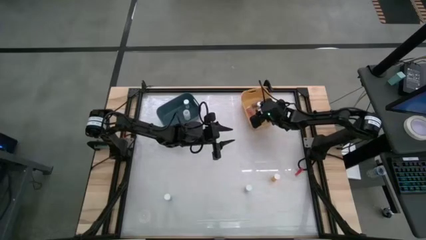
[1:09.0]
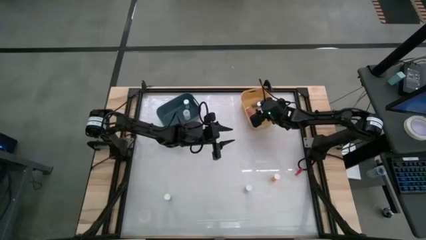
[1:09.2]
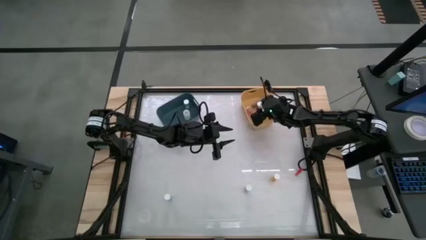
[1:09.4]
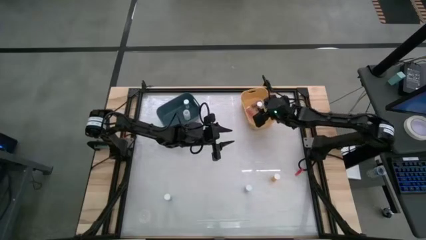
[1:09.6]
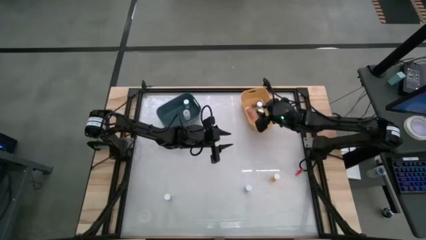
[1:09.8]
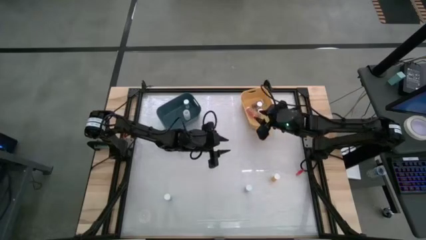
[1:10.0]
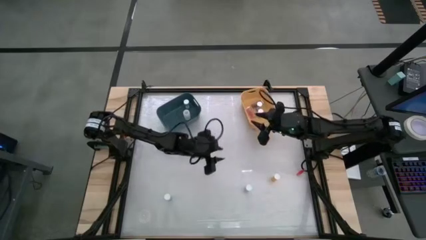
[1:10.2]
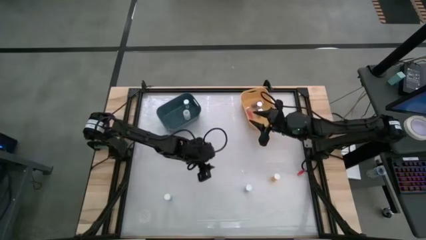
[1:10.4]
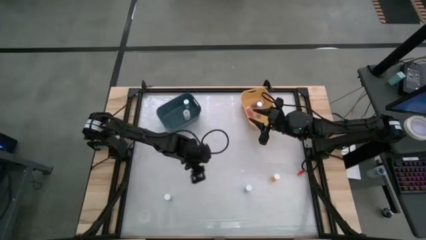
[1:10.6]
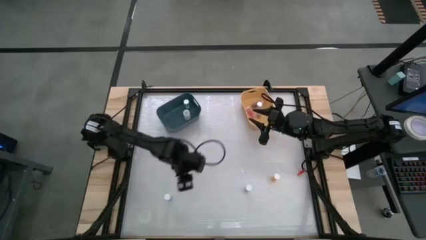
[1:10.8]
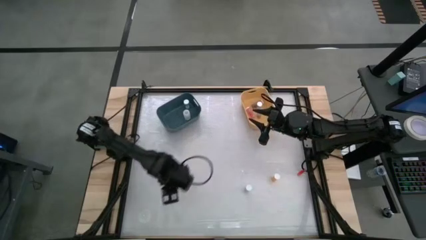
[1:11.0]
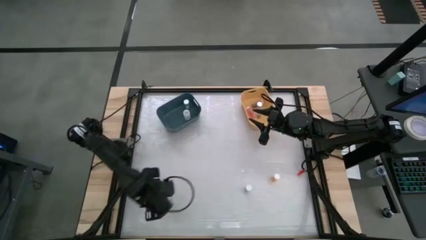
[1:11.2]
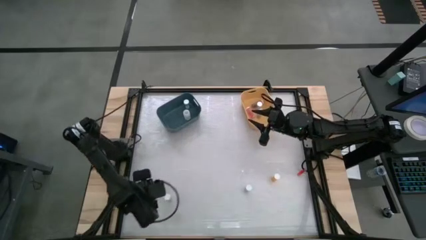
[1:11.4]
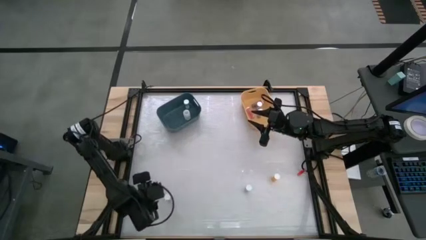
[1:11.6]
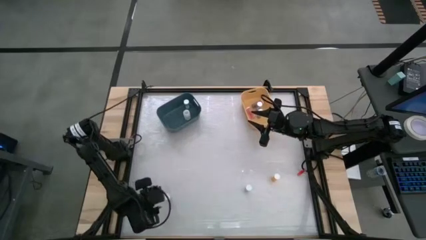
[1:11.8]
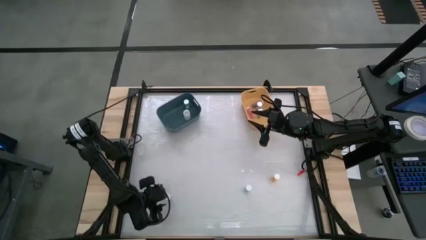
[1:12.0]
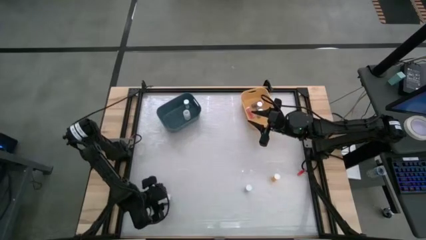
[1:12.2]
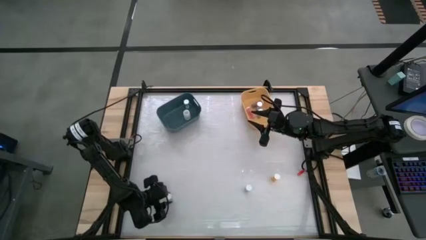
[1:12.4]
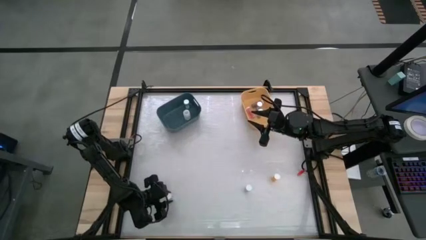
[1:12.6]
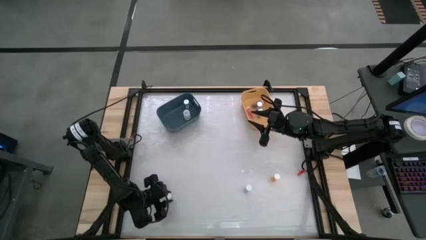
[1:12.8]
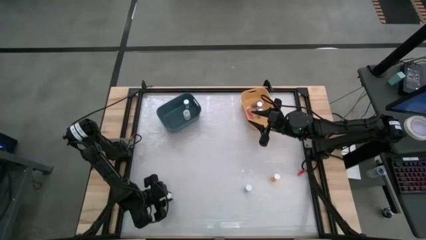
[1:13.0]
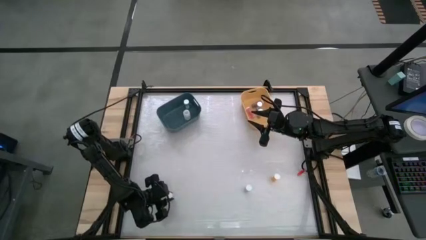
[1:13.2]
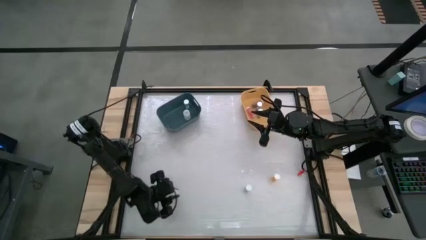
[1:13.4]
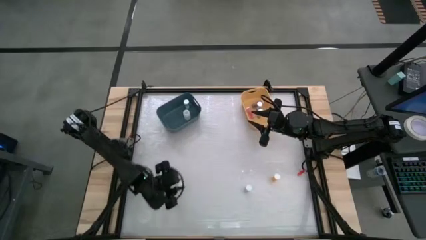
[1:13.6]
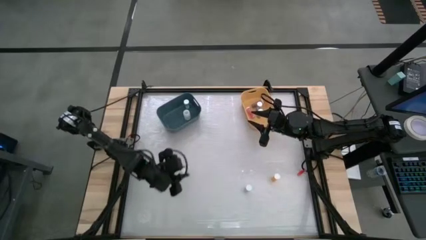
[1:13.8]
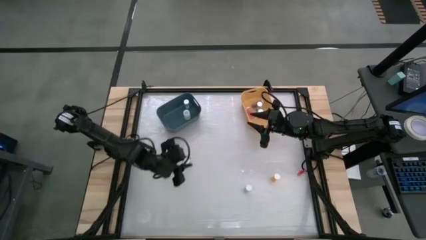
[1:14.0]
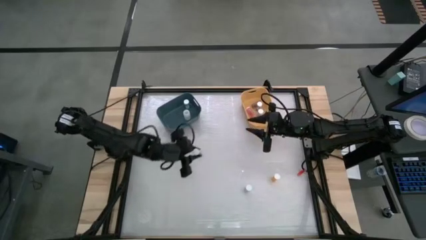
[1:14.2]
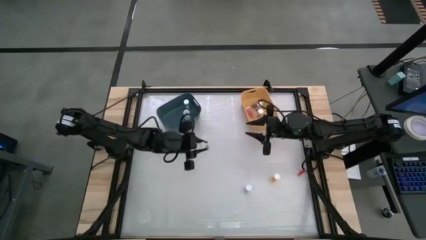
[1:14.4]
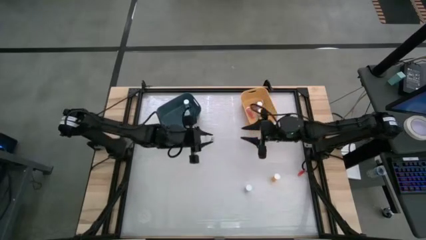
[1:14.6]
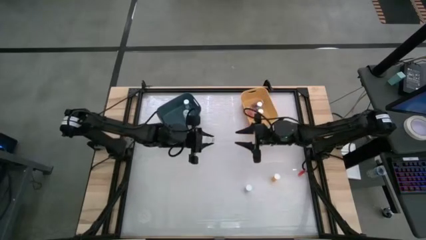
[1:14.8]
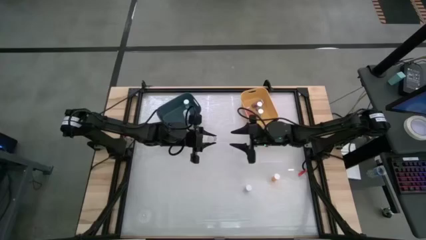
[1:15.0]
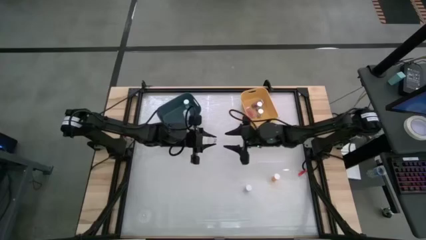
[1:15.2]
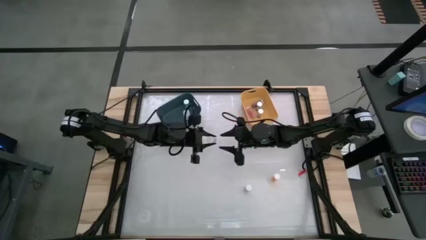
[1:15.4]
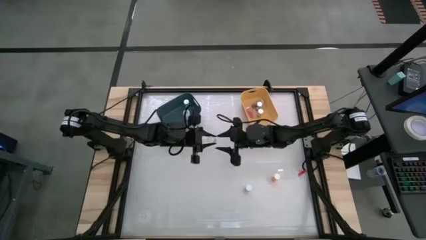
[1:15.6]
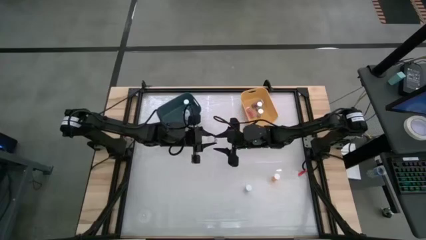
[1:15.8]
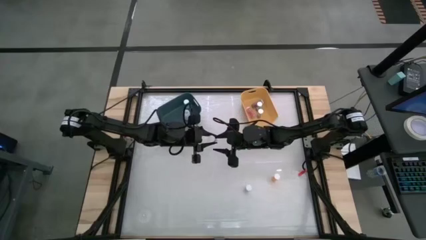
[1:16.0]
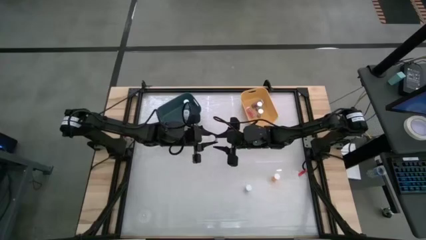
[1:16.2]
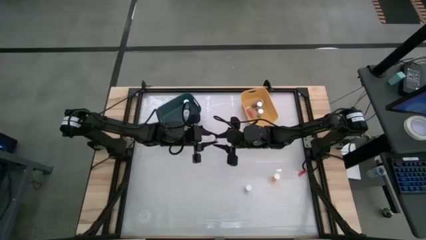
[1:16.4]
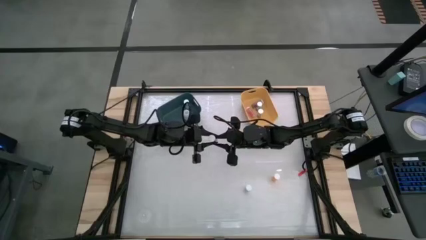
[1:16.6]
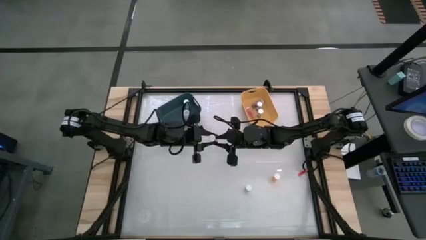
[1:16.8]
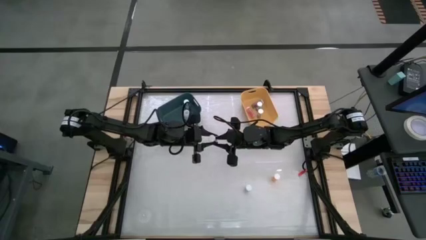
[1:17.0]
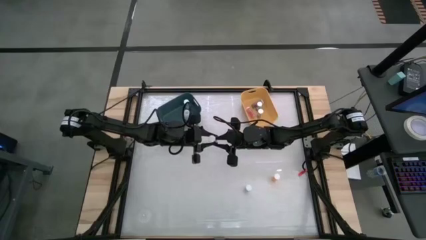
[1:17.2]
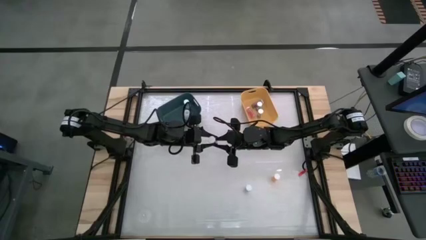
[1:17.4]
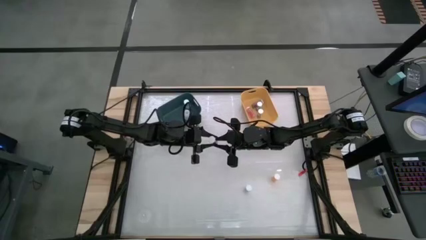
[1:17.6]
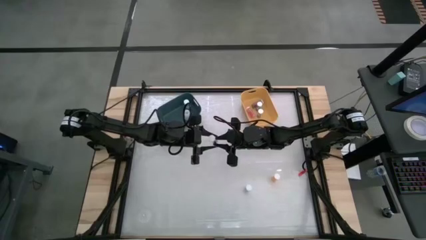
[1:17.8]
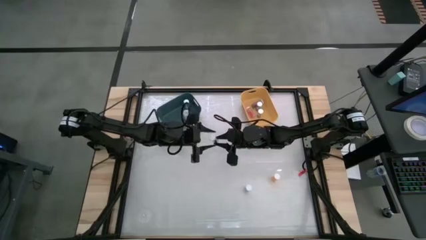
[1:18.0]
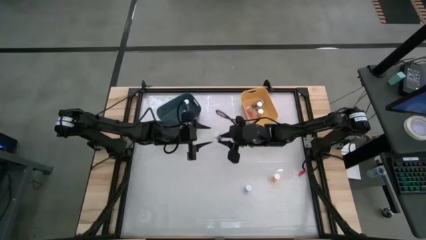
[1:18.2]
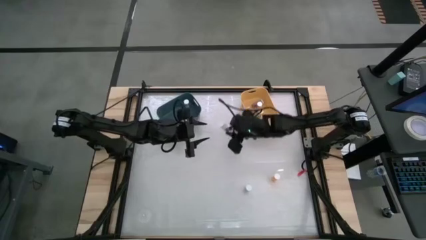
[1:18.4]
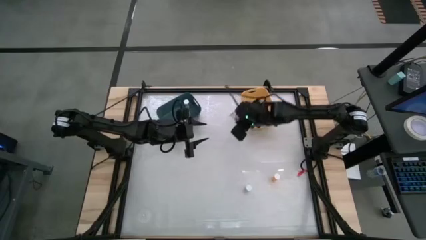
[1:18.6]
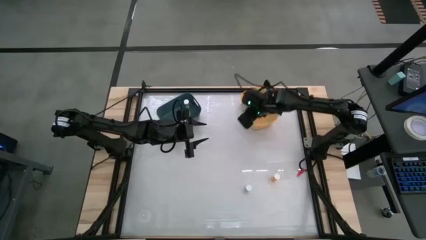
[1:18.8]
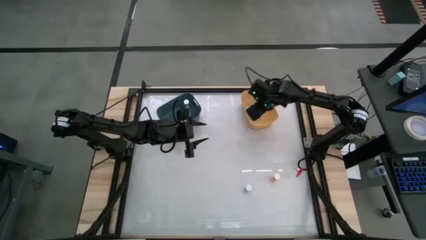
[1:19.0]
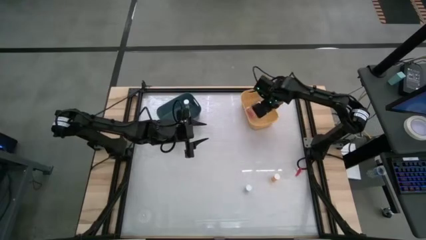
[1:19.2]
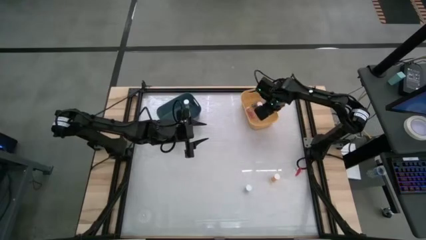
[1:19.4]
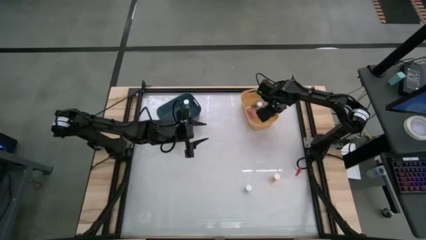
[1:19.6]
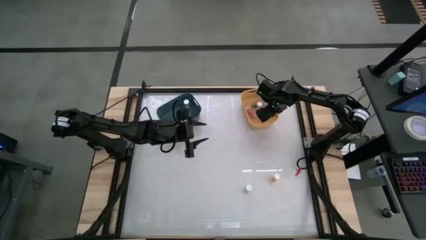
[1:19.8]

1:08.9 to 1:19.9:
Task: Pick and place medicine bottles into bin by pill shape (circle, oval)
Put the blue capsule bottle into the yellow bin

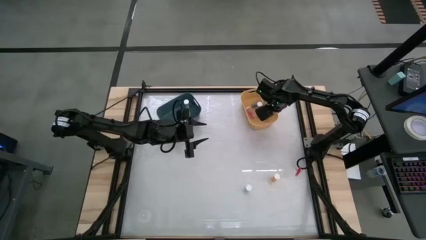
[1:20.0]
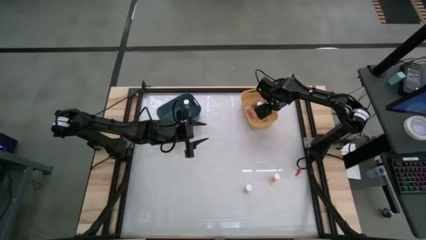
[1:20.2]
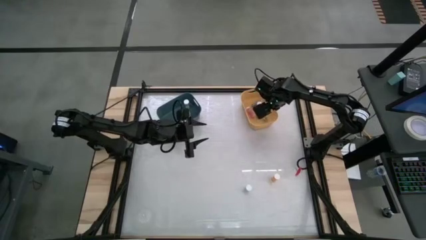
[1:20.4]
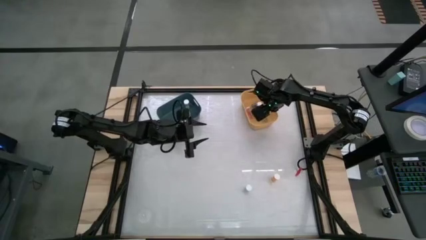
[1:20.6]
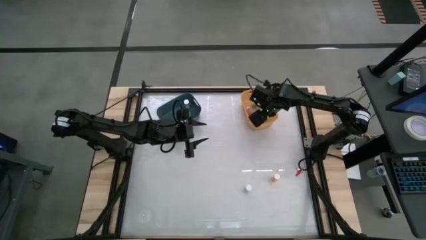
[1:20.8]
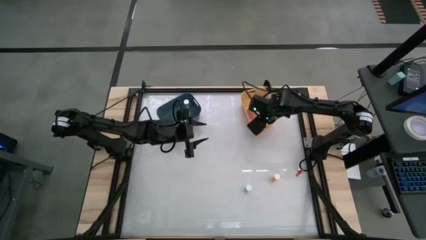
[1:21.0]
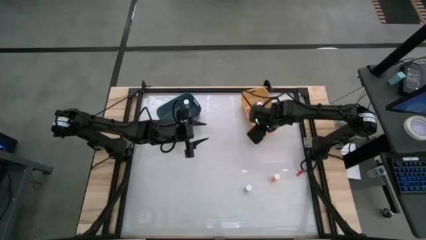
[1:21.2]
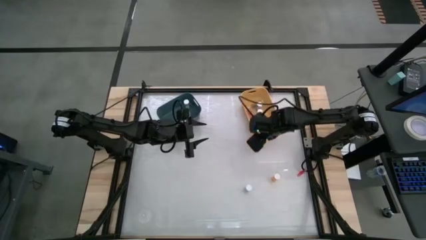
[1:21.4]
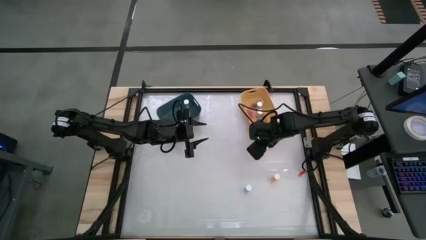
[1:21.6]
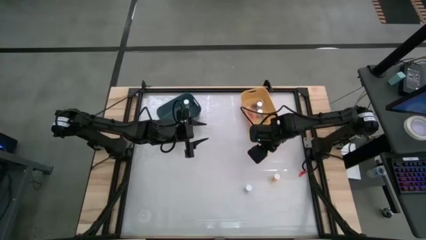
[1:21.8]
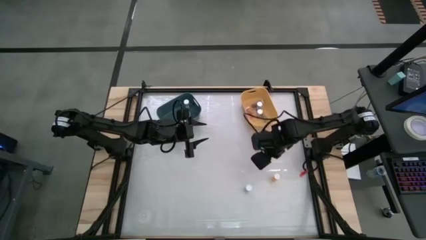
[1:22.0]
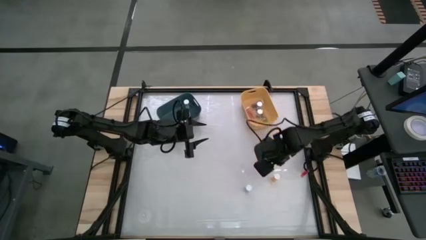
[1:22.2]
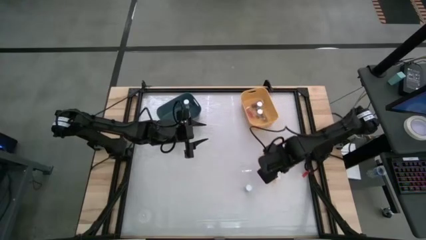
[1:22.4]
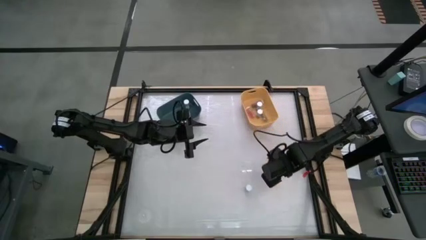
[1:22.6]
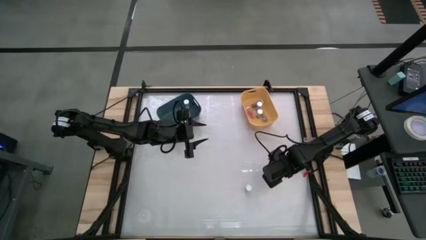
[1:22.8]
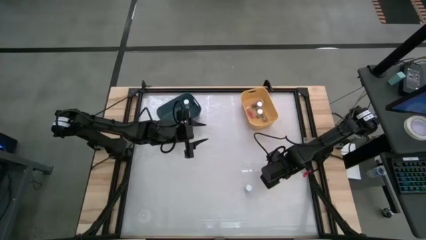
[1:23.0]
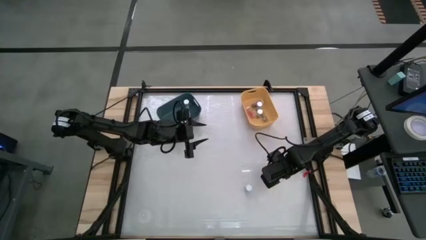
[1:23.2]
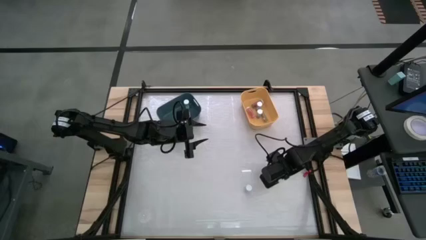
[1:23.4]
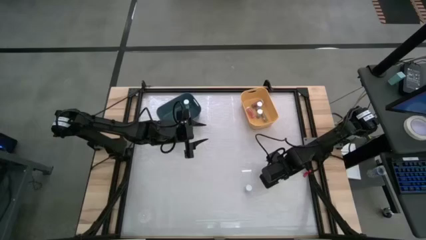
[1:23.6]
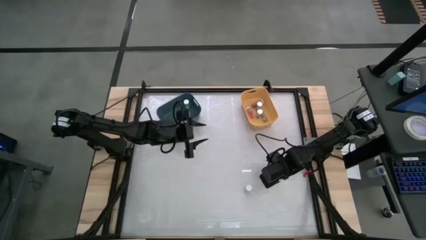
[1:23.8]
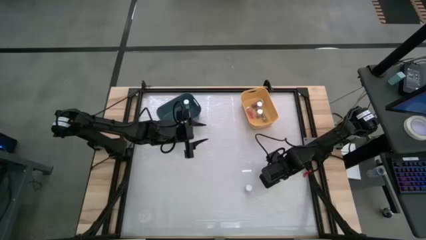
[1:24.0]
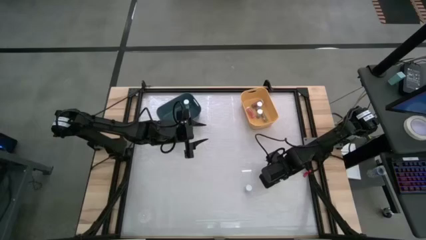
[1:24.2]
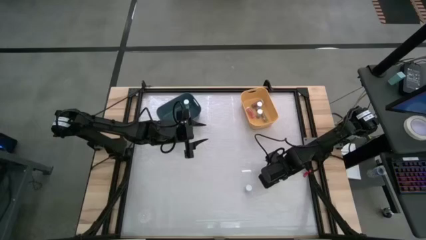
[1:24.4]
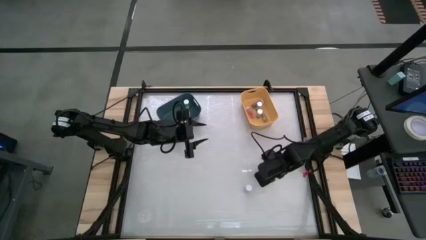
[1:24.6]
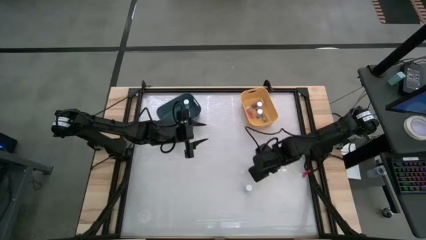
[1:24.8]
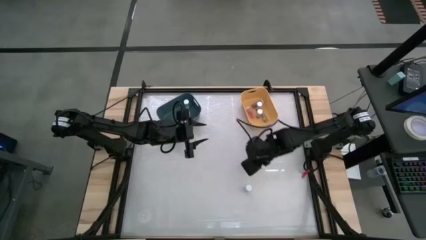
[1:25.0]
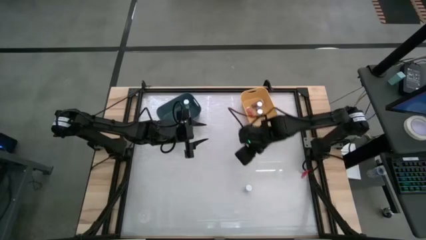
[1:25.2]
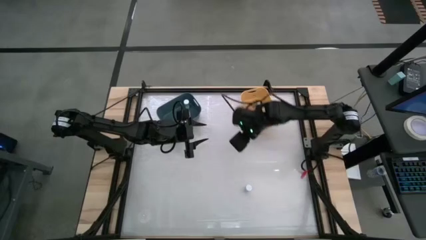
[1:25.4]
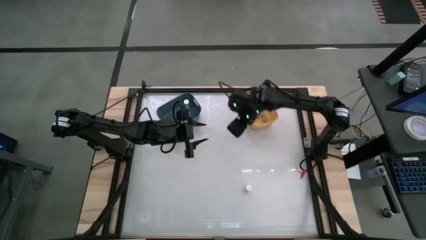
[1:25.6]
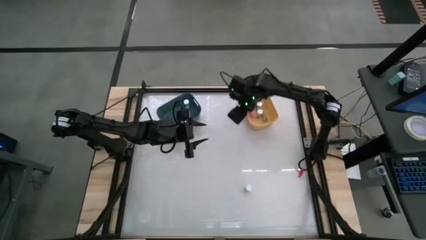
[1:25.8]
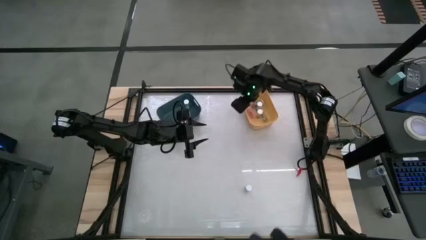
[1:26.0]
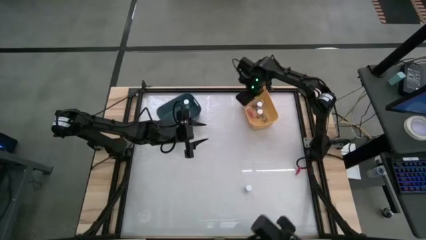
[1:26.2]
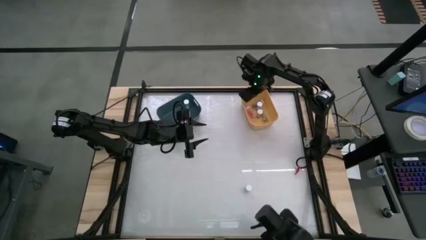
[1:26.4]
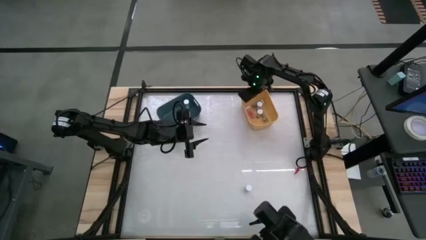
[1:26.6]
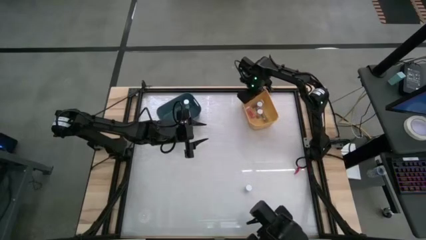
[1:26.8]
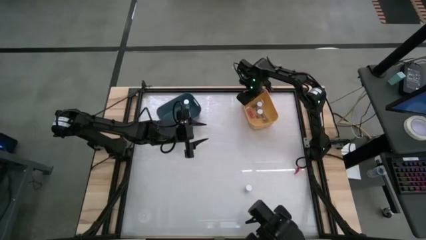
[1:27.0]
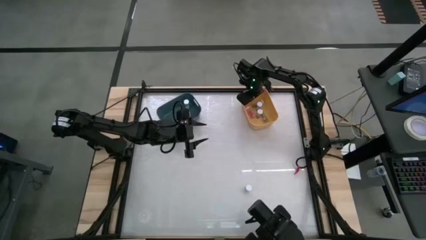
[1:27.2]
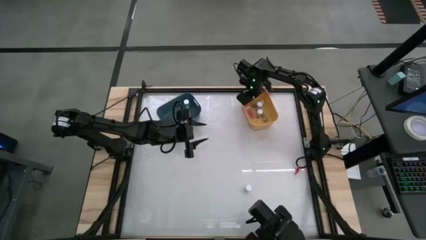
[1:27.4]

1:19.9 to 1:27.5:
Put the orange capsule bottle into the yellow bin
